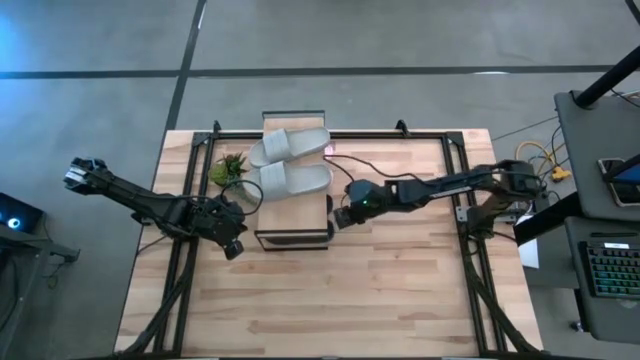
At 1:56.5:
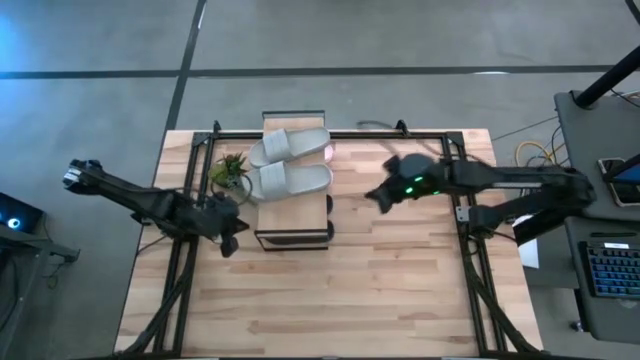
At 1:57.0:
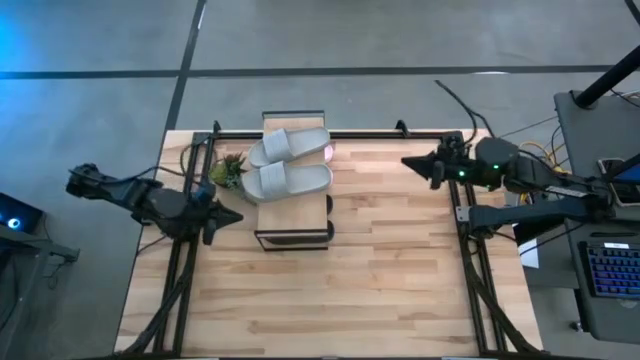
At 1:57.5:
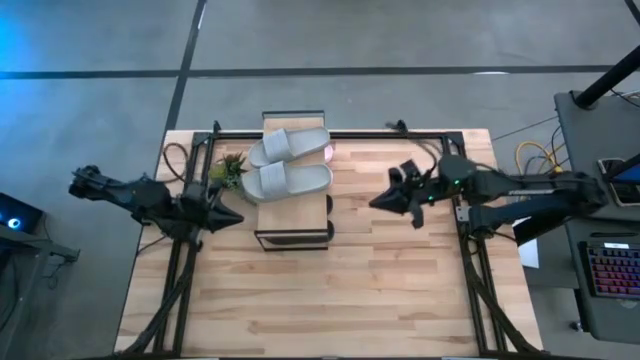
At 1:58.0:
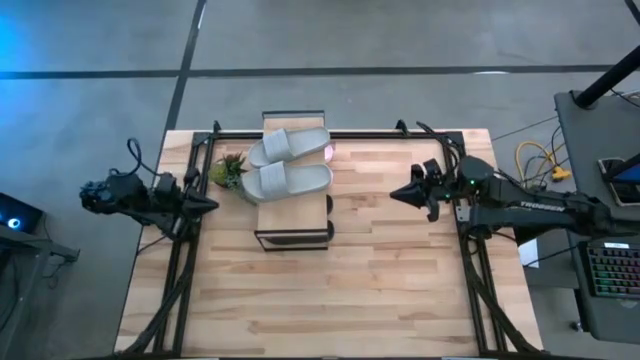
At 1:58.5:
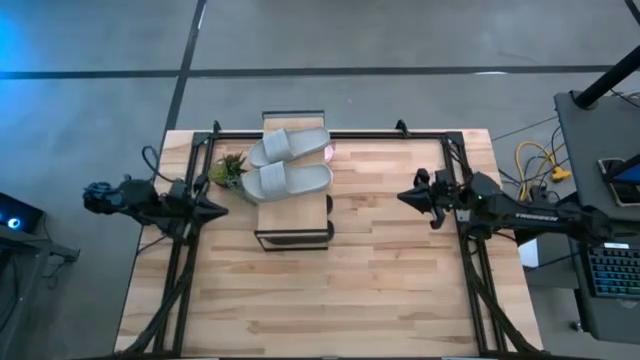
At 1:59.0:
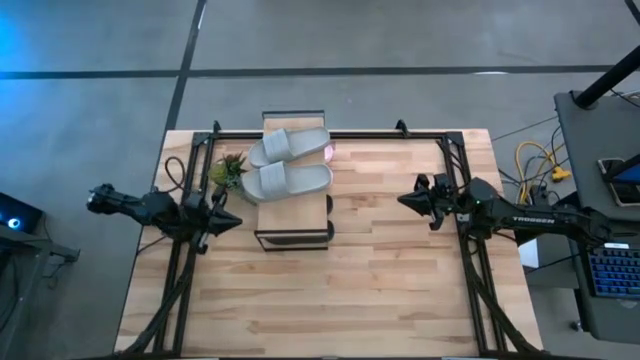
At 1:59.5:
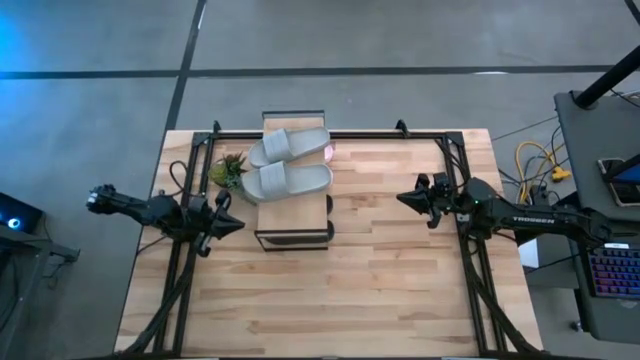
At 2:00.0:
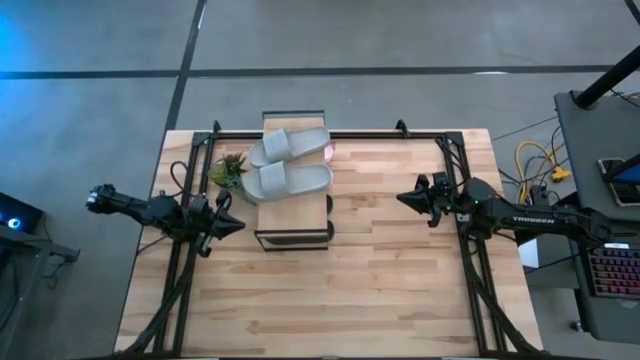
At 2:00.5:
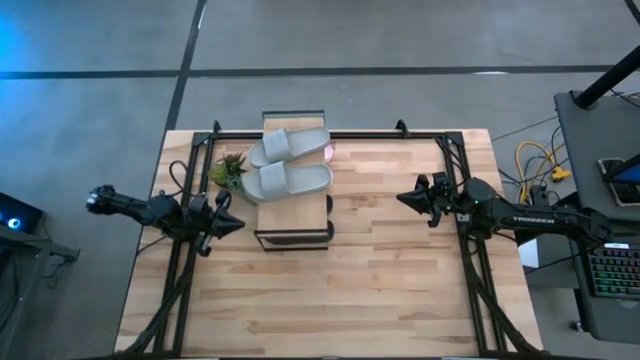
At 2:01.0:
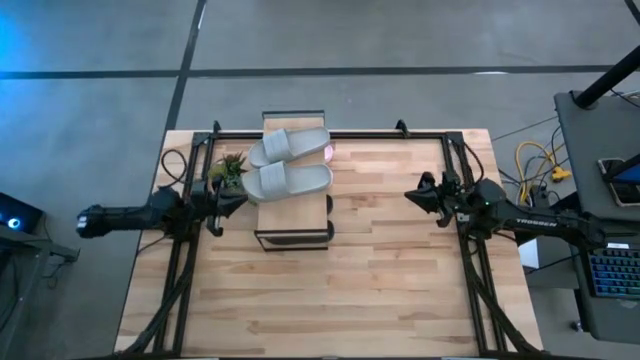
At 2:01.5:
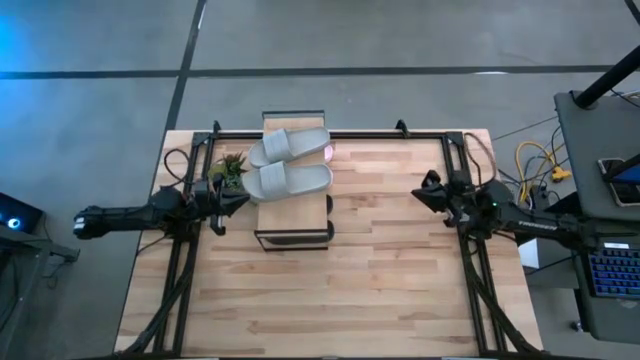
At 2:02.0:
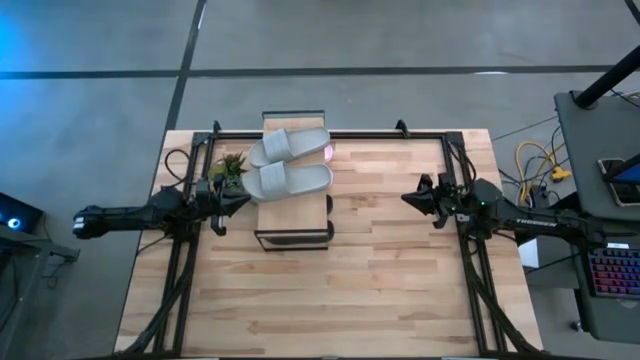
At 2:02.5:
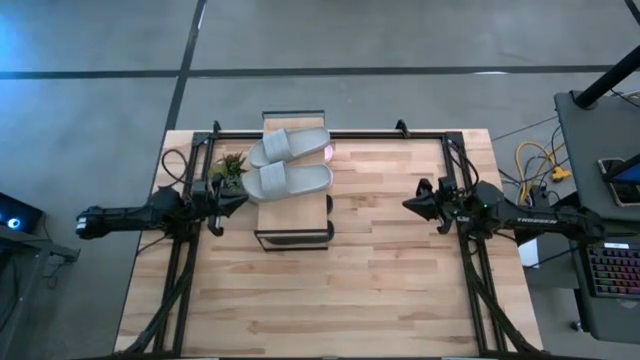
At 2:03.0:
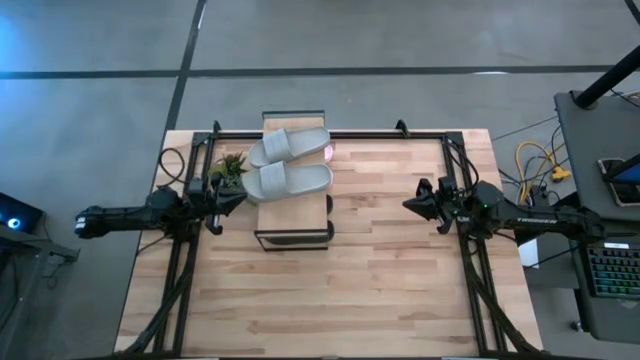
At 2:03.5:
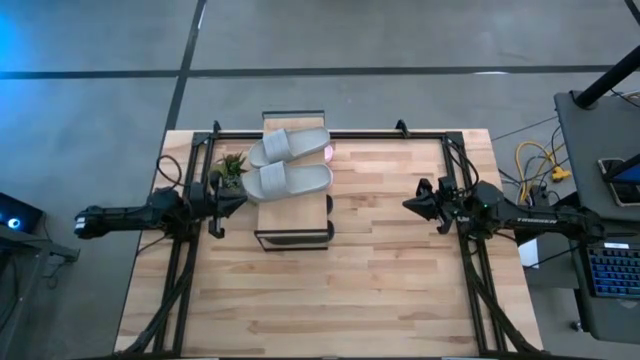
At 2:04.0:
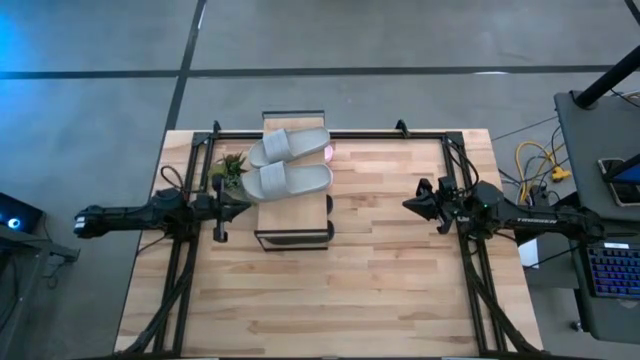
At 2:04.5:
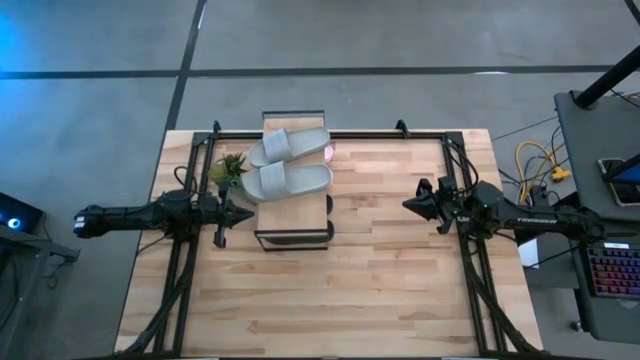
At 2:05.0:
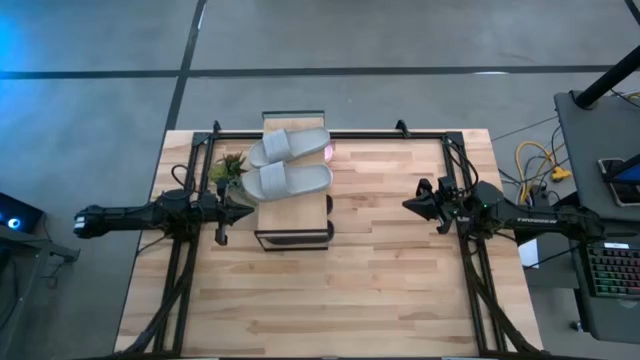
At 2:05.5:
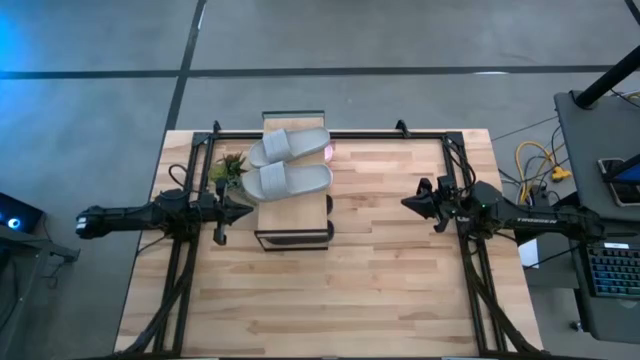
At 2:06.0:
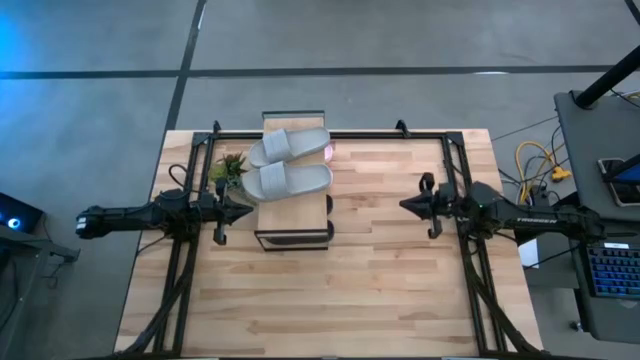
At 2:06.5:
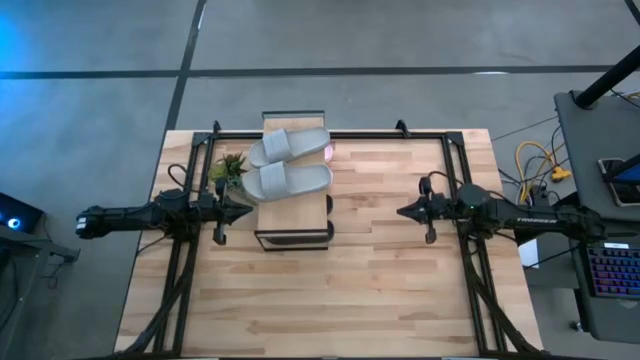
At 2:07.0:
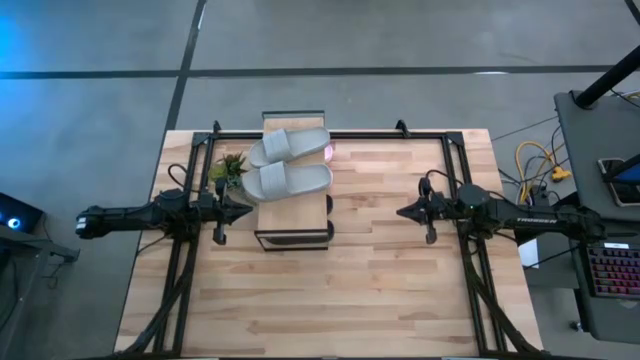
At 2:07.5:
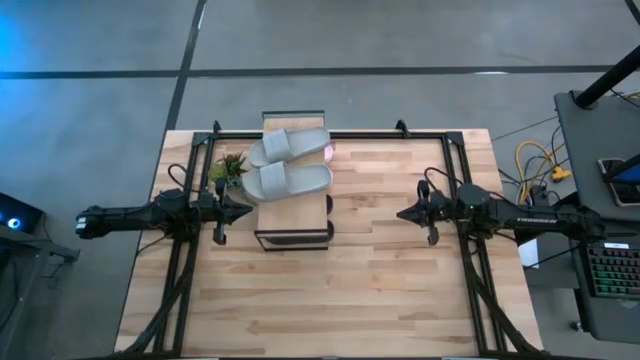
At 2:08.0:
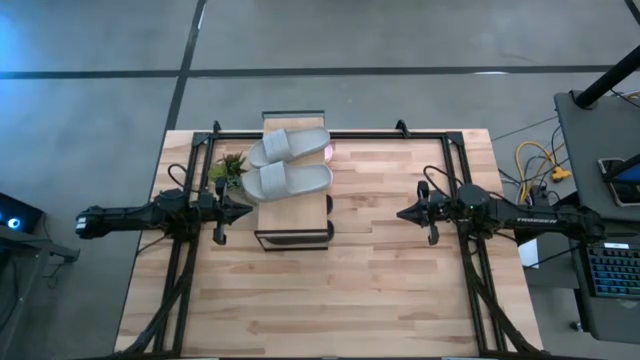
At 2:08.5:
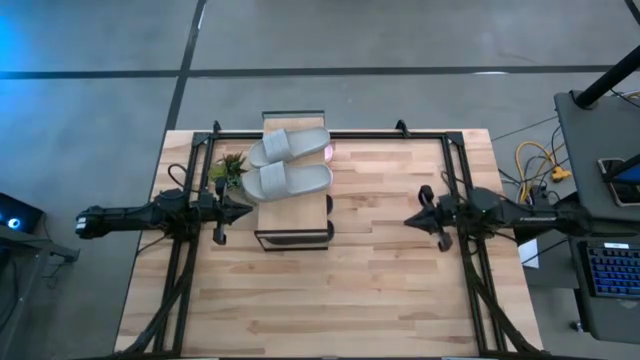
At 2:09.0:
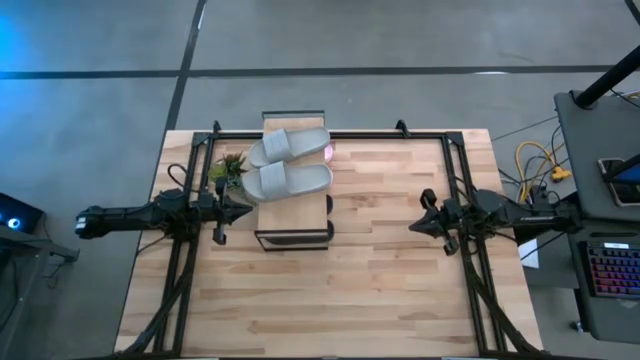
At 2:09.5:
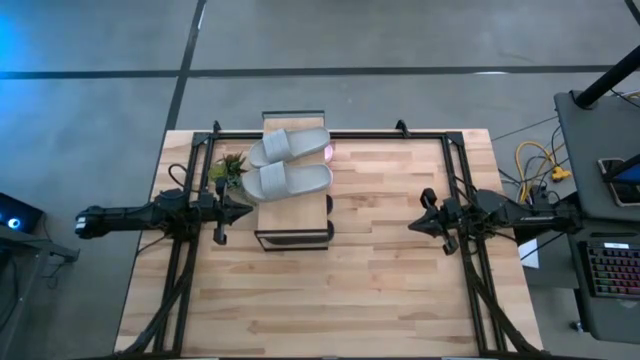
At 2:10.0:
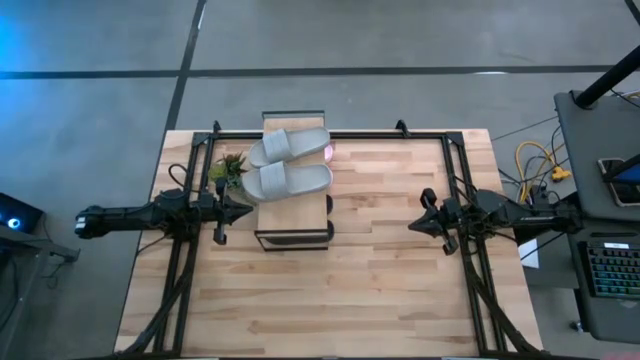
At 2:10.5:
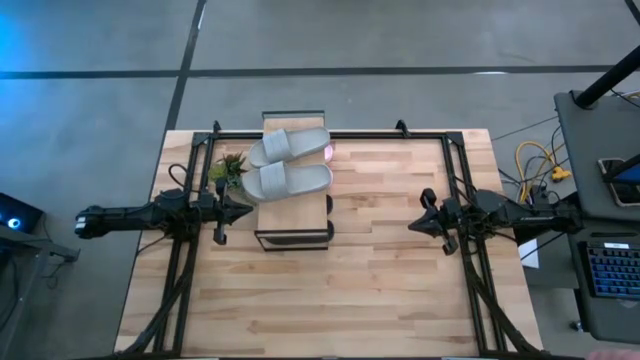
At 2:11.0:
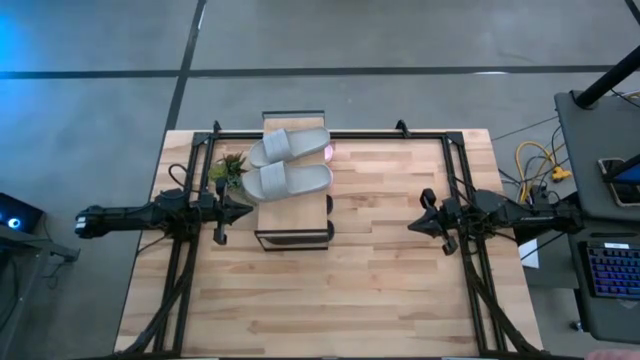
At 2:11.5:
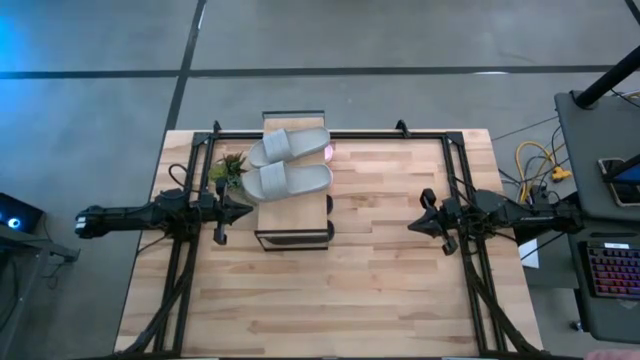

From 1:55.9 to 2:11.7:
Task: Pick and place slides into the shelf
Return to Home Position

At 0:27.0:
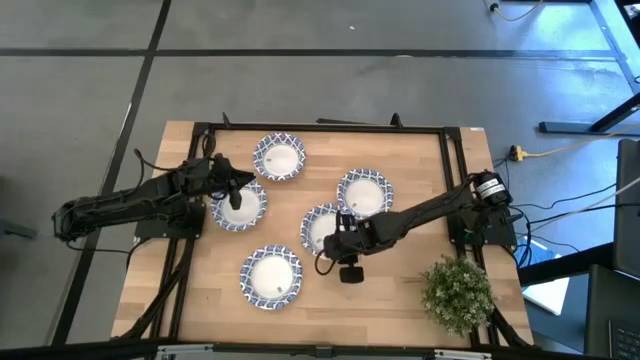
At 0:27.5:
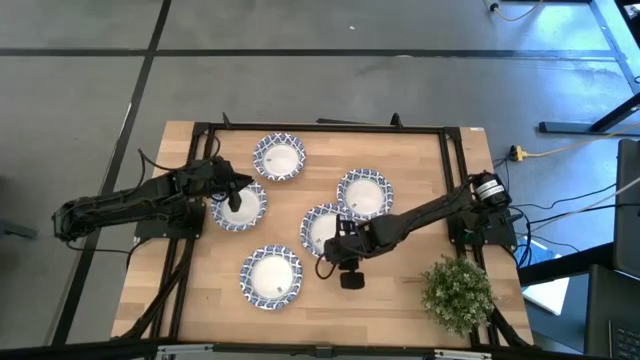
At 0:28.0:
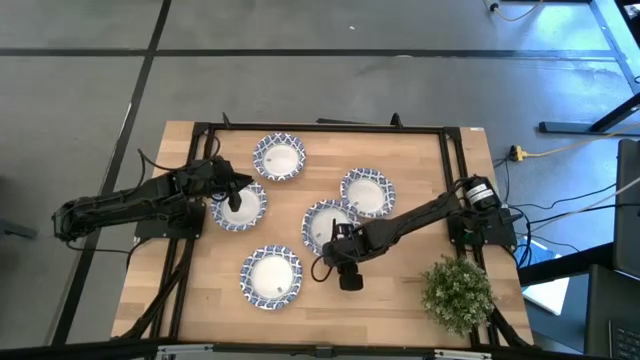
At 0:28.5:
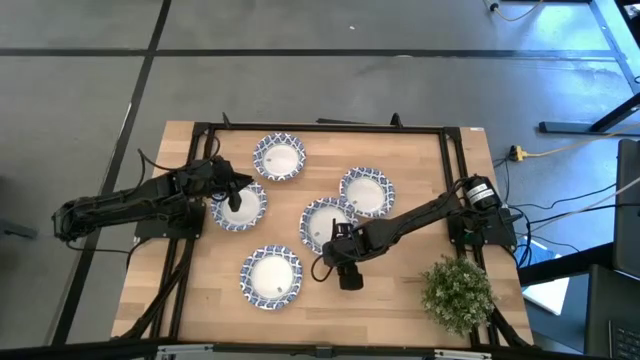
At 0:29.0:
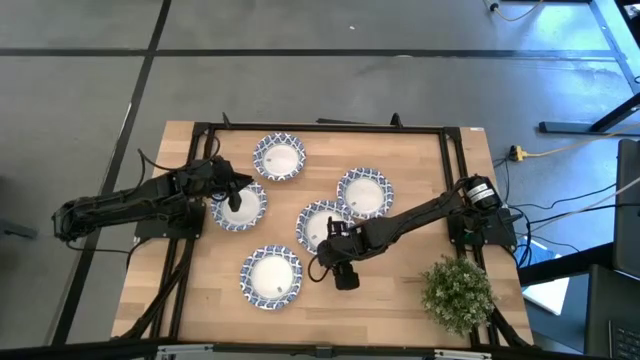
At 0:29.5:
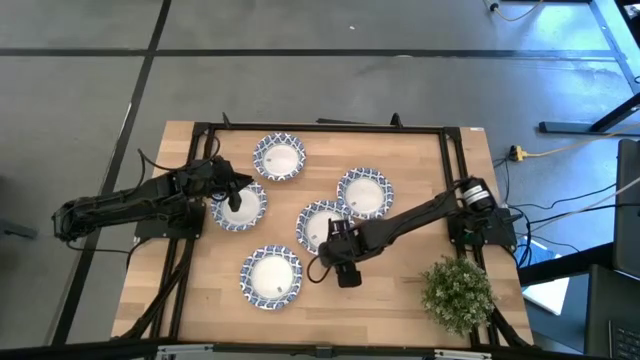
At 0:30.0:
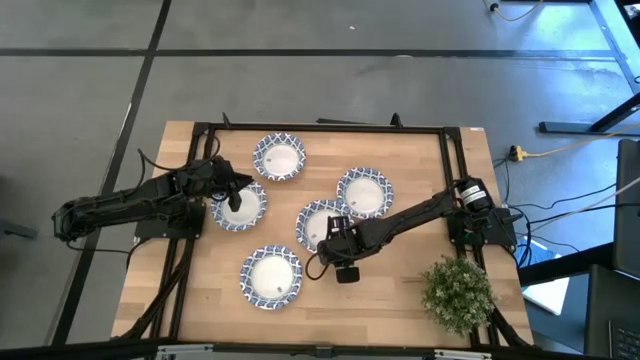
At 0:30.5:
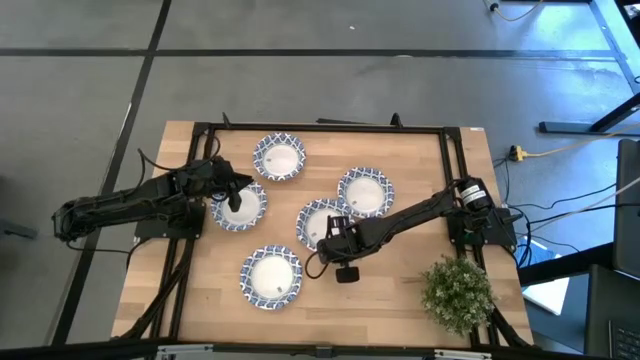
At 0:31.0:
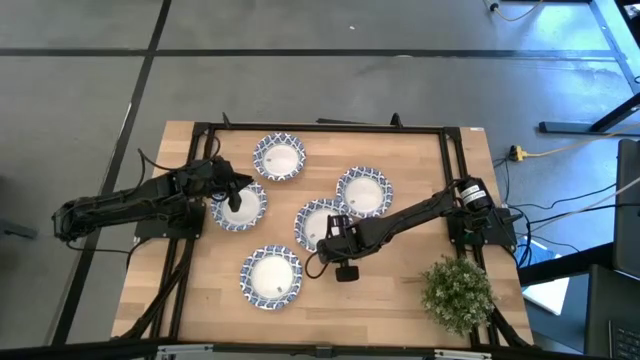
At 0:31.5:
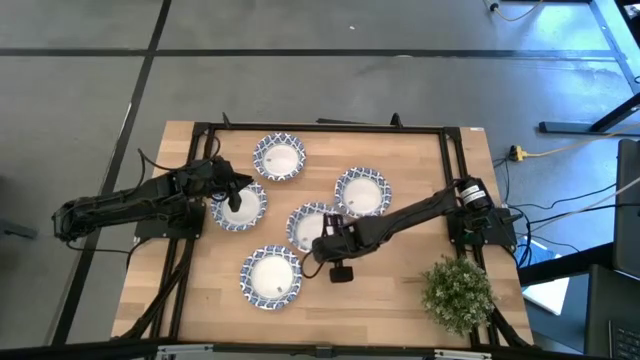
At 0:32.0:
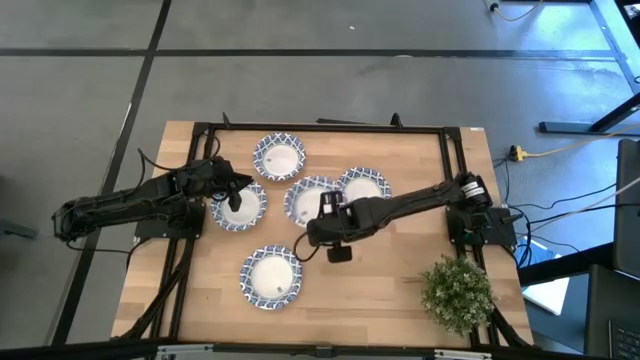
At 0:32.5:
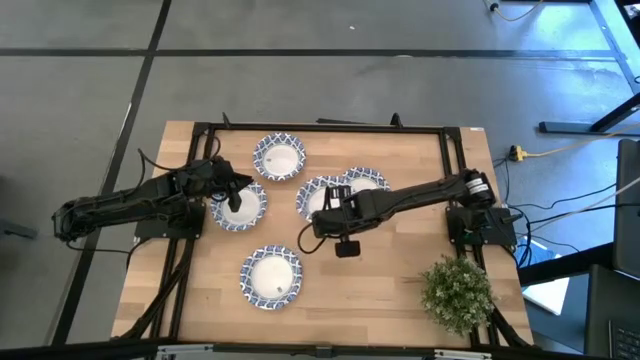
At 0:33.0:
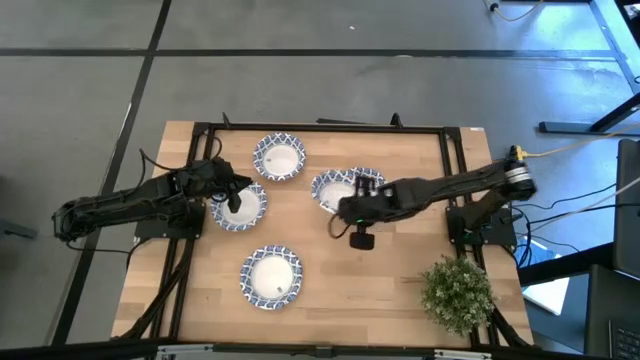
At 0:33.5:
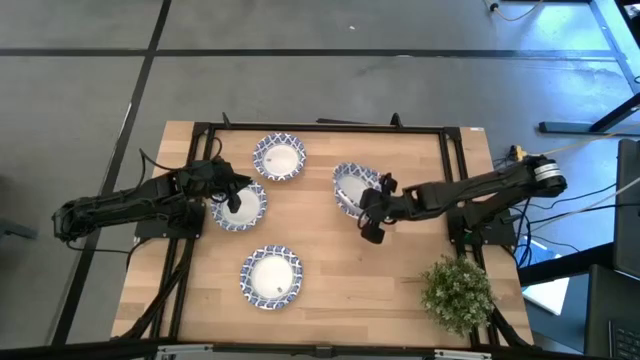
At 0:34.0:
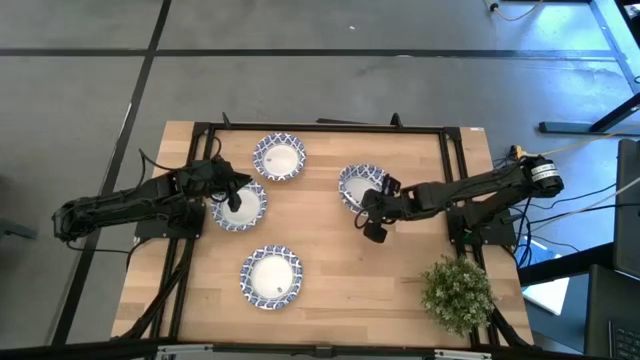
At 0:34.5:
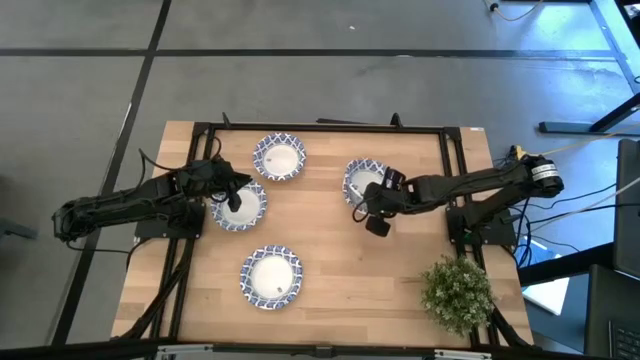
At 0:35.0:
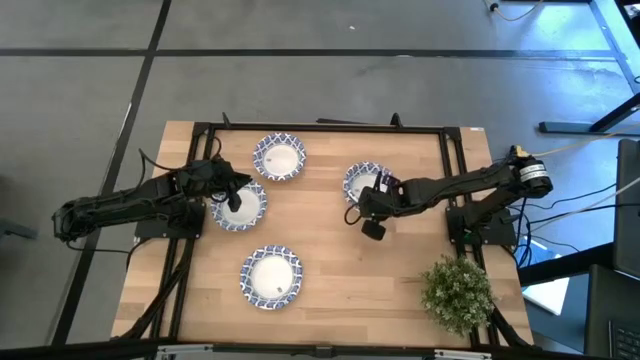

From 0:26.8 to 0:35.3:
Task: Nest bowls inside each other
Stack the blue bowl on the blue bowls
